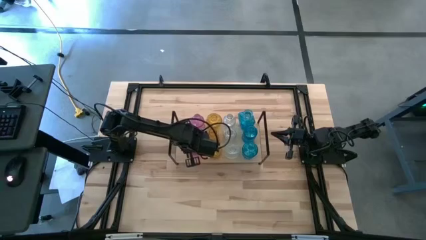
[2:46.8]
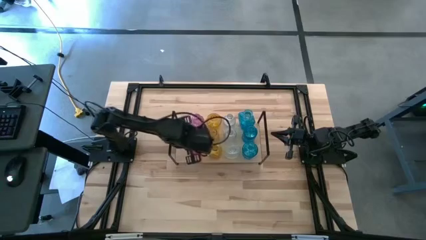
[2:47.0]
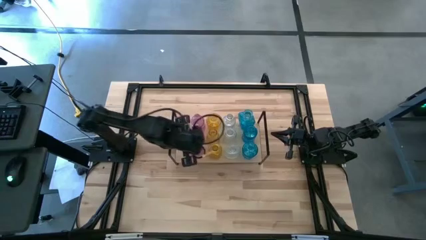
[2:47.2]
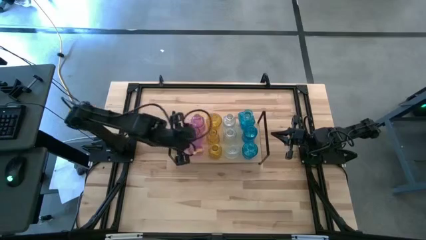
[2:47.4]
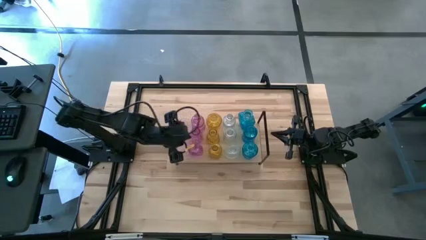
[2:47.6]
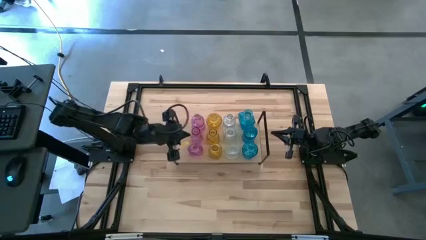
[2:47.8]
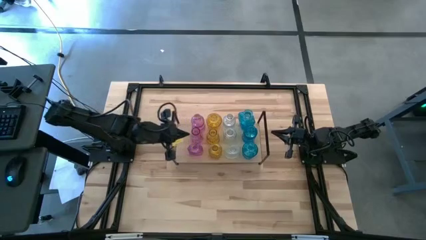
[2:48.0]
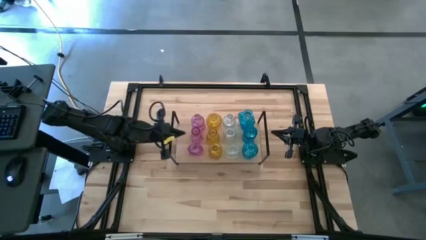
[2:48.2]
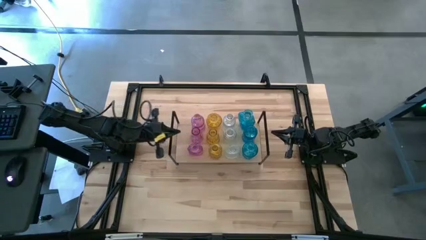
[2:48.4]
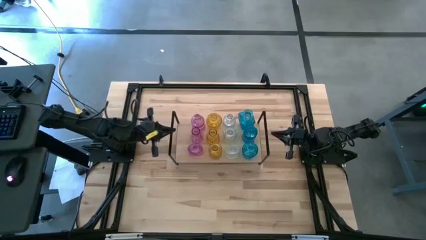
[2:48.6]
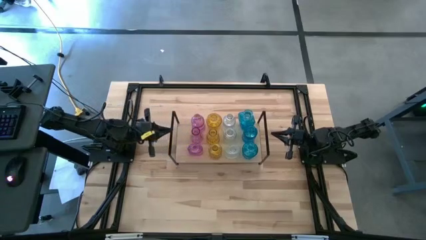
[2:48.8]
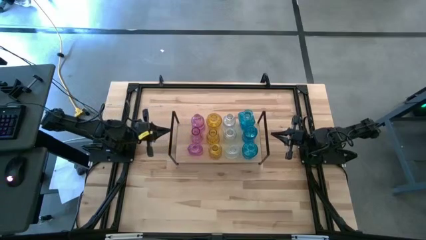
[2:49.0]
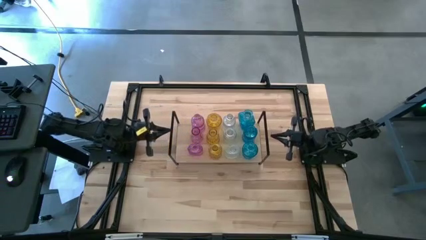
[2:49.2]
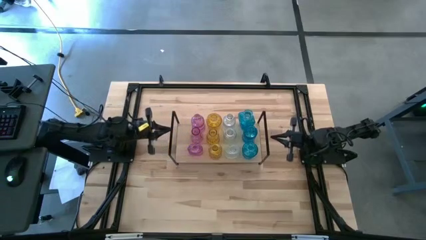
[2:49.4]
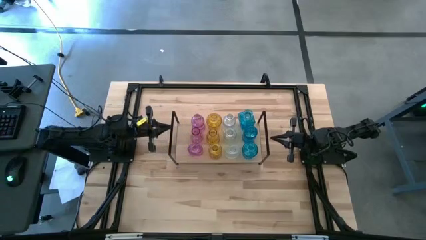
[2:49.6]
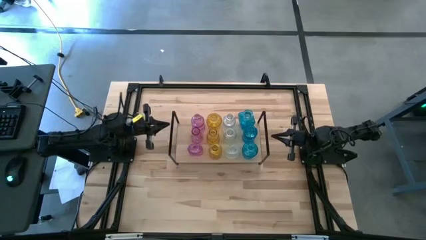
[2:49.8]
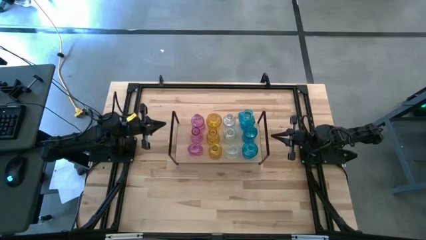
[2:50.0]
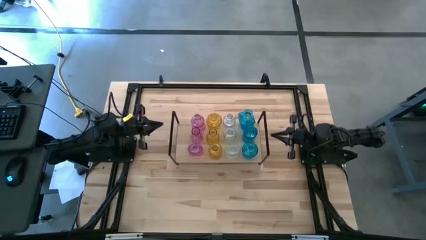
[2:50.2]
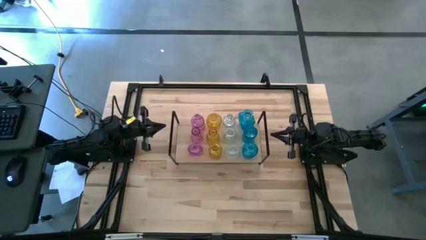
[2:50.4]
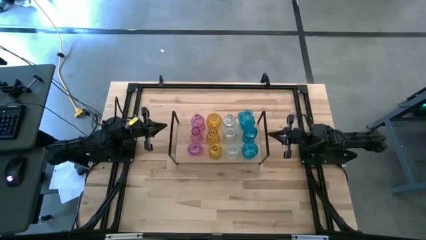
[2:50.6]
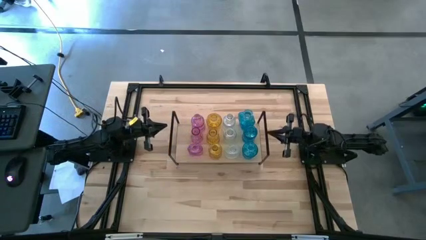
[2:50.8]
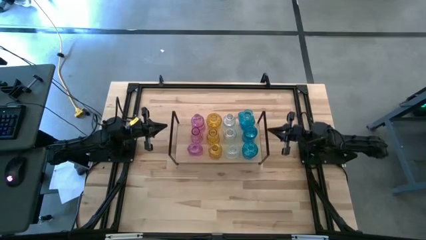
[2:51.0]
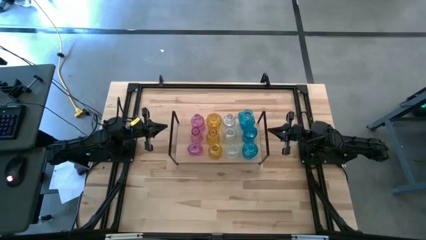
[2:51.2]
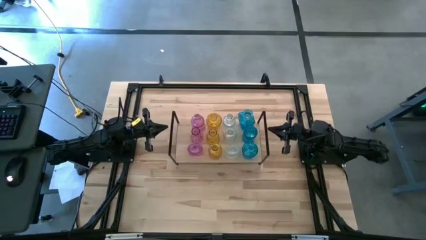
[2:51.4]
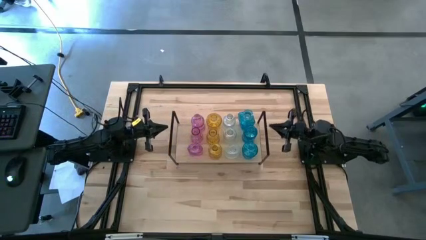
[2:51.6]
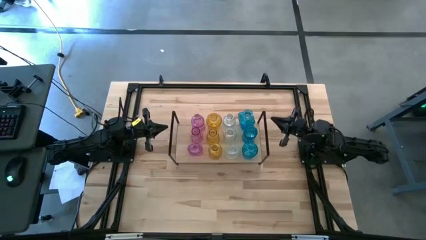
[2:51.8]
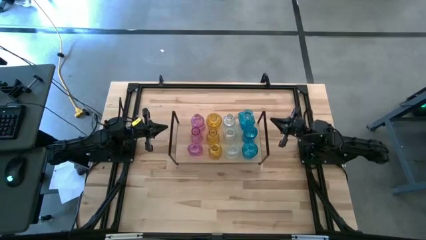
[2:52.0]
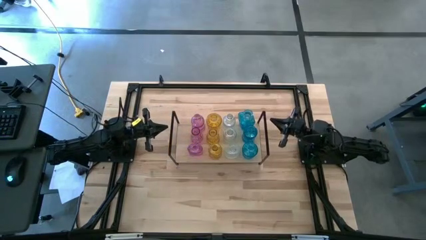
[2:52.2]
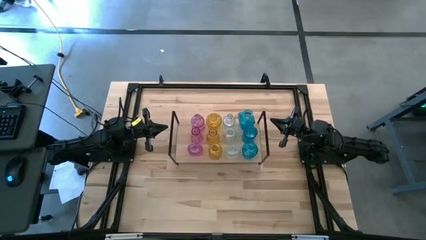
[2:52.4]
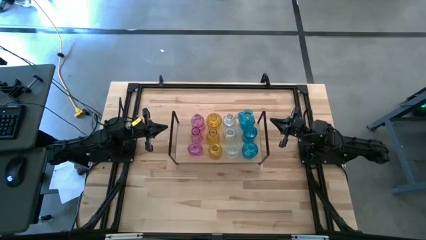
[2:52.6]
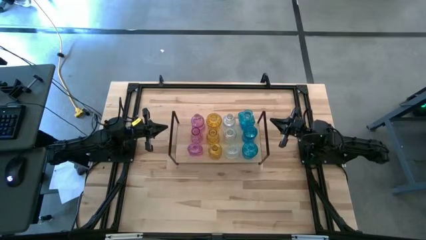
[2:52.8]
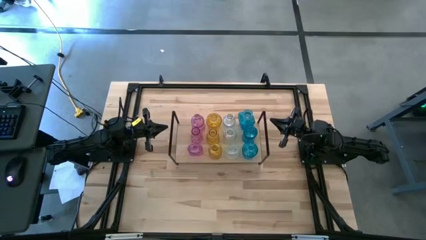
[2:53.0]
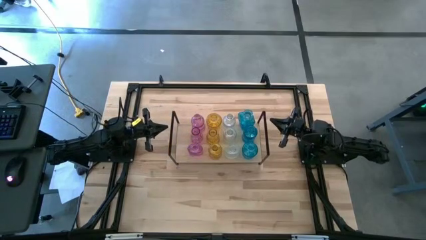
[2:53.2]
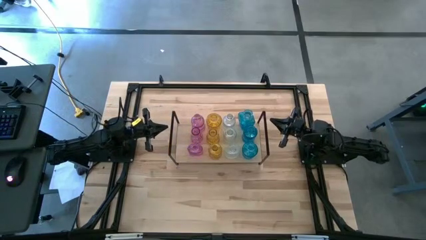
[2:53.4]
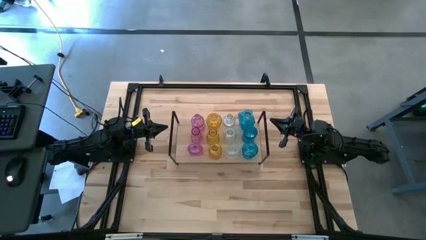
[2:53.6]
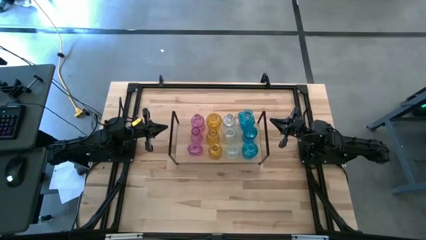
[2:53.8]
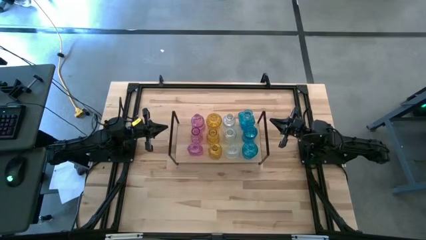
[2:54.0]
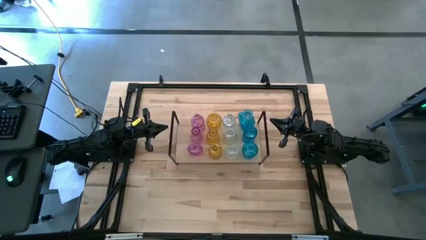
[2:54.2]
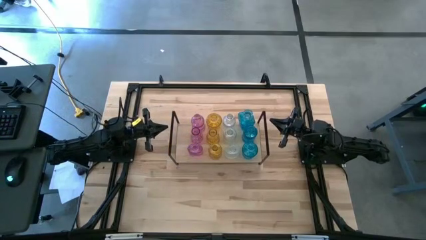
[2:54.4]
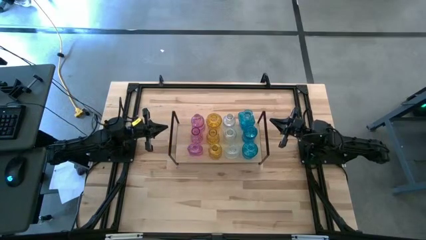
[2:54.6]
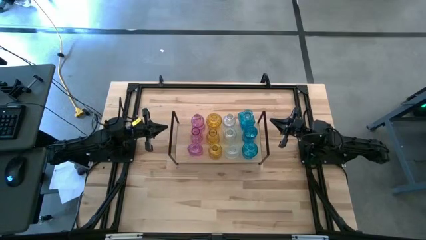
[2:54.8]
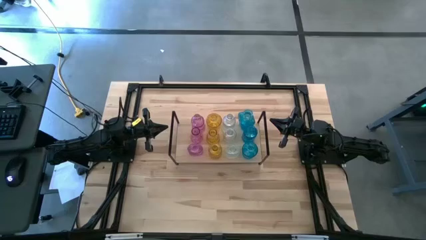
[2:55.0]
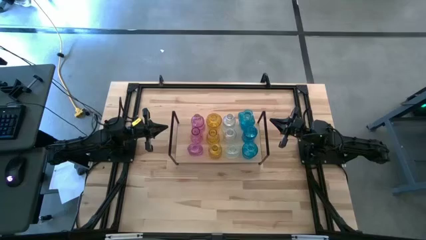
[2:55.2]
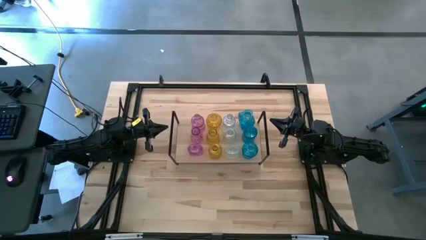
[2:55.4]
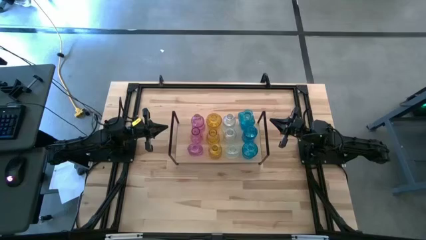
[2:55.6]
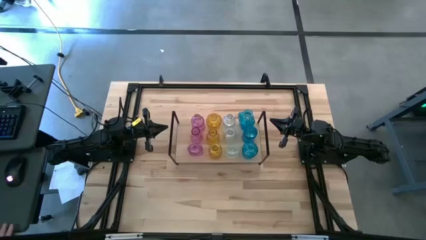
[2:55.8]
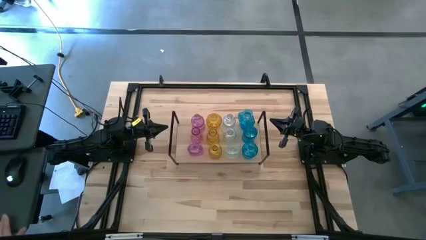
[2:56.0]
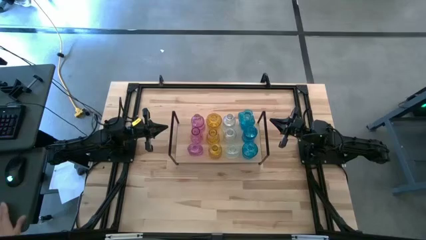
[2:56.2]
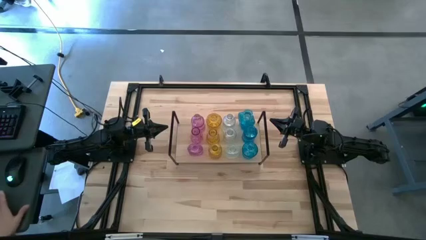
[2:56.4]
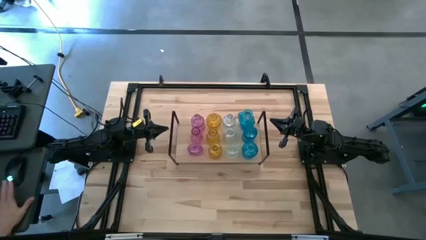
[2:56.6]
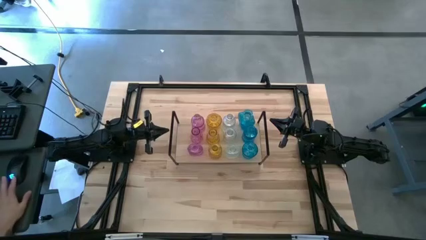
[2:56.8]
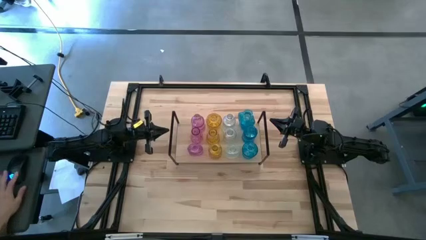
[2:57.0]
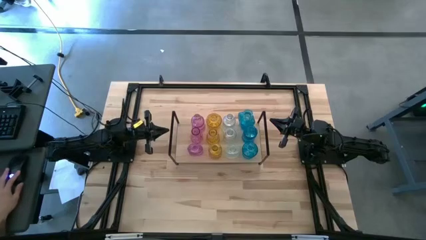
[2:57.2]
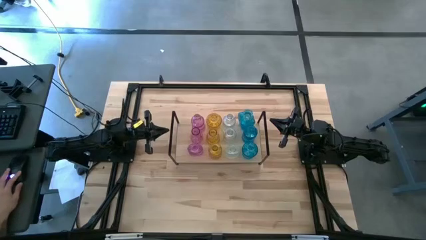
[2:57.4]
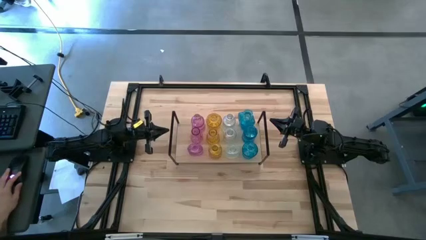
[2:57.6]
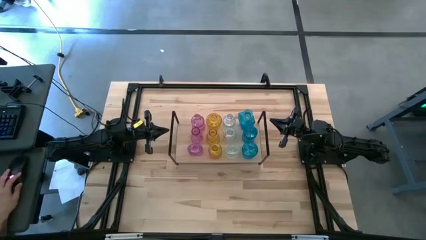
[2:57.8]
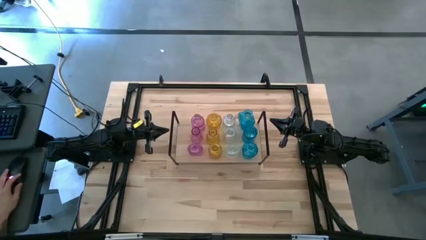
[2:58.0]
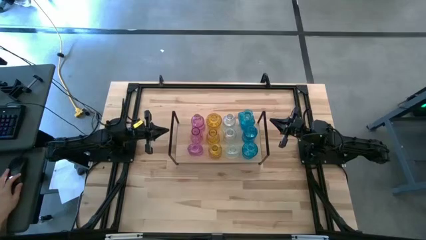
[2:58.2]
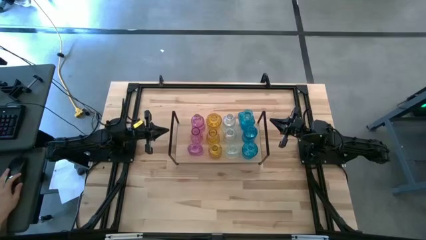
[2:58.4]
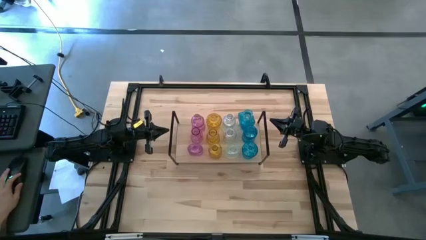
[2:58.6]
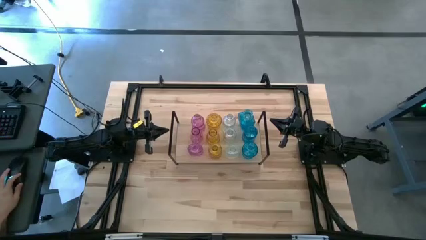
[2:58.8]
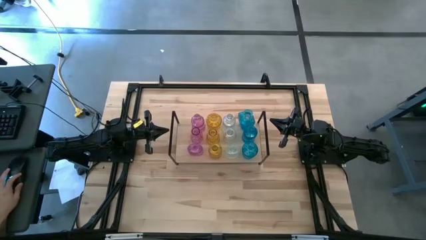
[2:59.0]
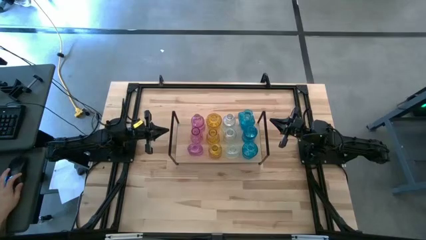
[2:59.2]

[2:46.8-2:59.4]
Task: sort vases onto shelf
Return to Home Position
